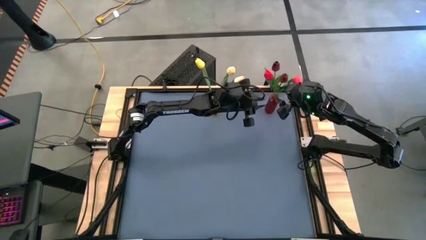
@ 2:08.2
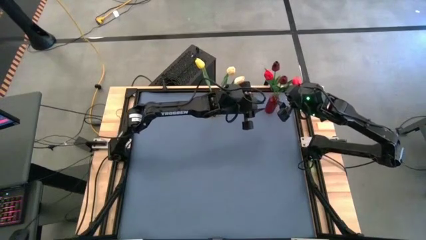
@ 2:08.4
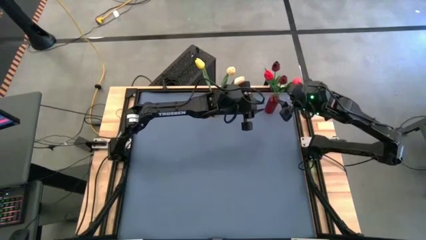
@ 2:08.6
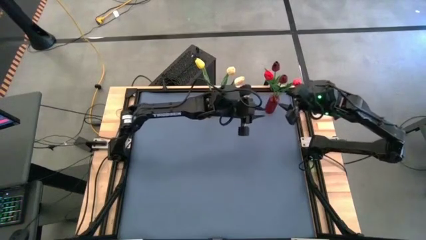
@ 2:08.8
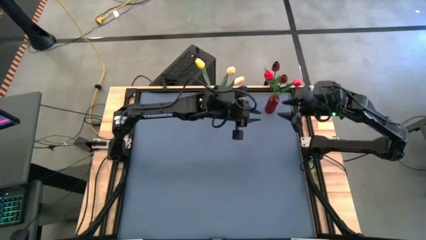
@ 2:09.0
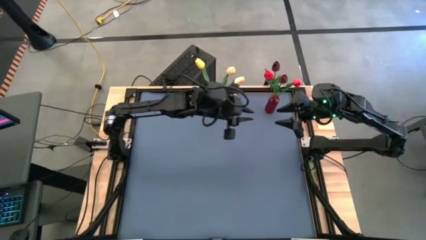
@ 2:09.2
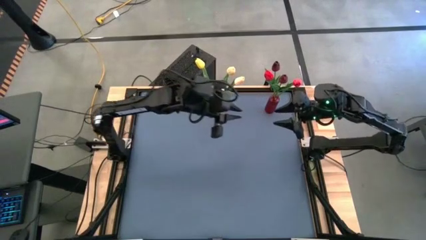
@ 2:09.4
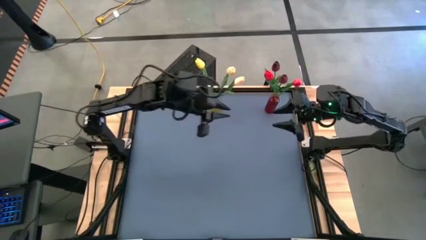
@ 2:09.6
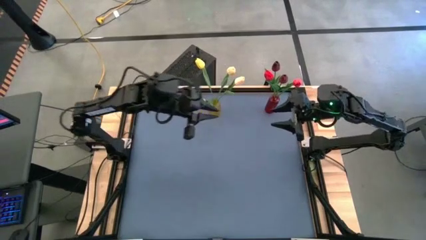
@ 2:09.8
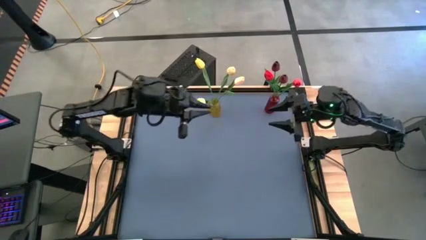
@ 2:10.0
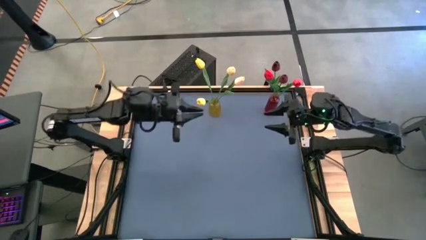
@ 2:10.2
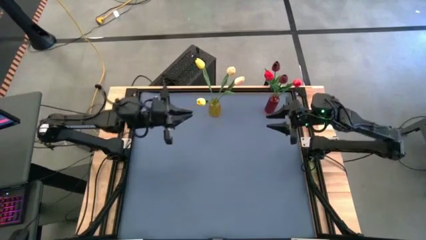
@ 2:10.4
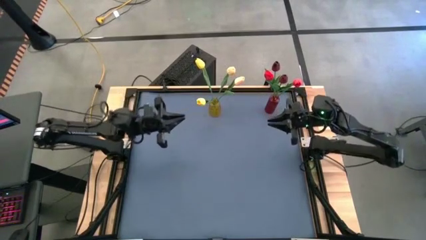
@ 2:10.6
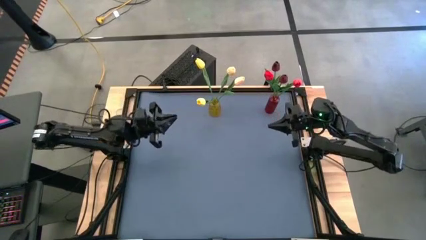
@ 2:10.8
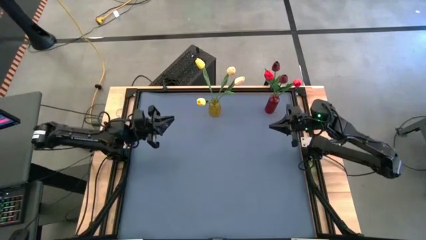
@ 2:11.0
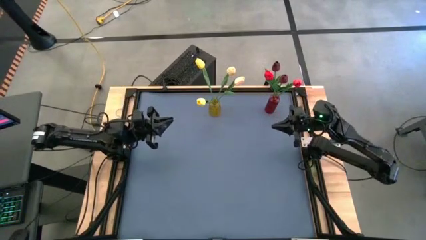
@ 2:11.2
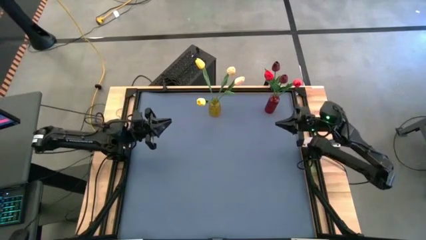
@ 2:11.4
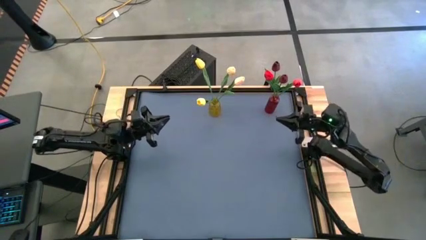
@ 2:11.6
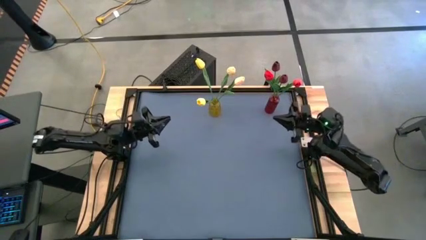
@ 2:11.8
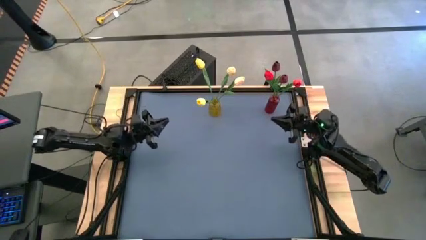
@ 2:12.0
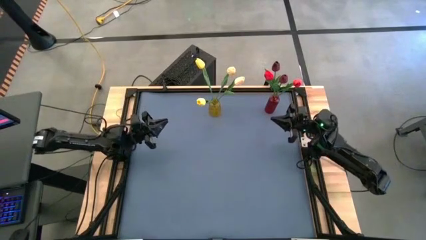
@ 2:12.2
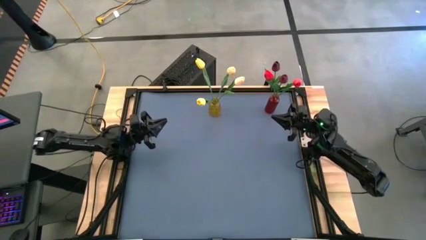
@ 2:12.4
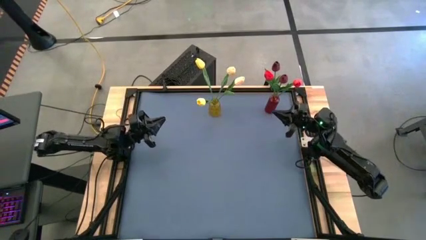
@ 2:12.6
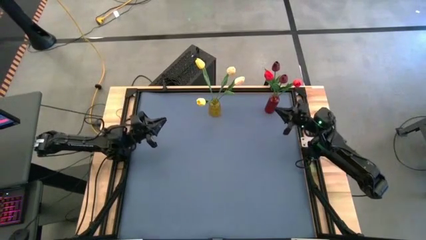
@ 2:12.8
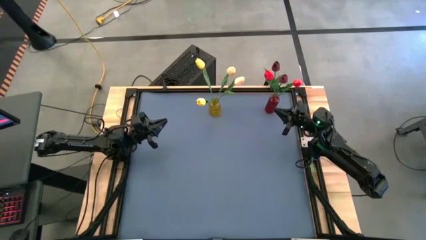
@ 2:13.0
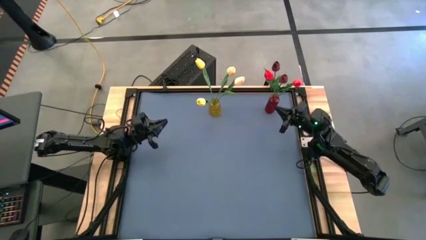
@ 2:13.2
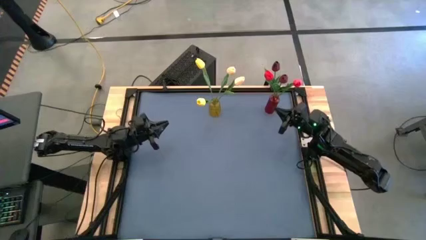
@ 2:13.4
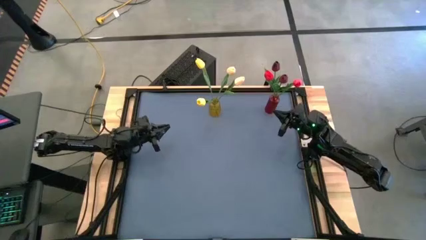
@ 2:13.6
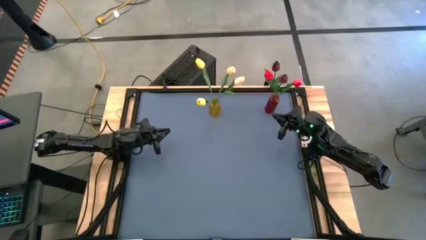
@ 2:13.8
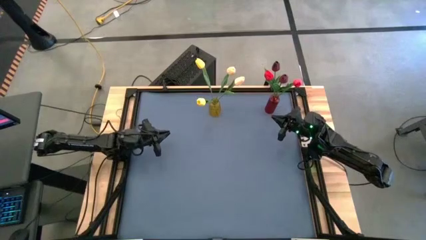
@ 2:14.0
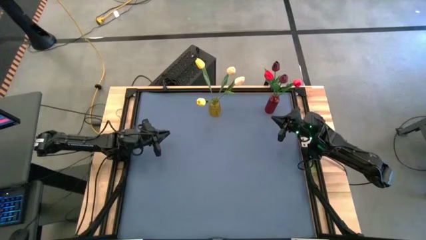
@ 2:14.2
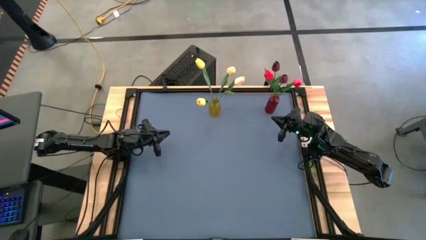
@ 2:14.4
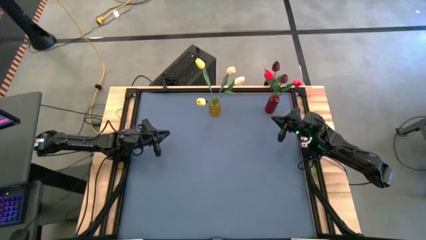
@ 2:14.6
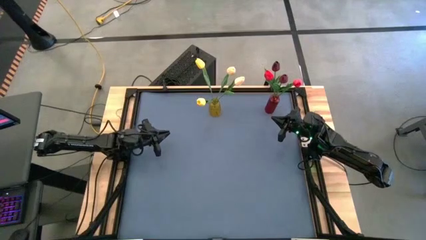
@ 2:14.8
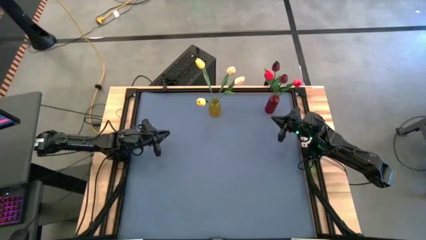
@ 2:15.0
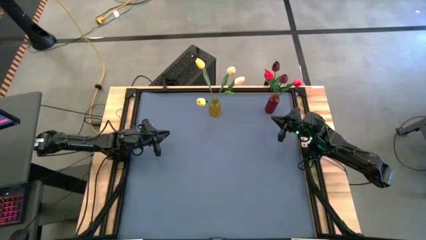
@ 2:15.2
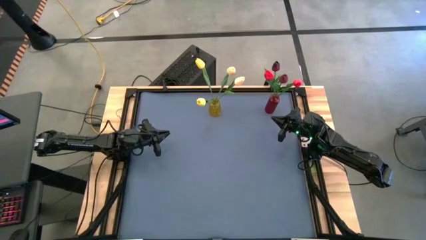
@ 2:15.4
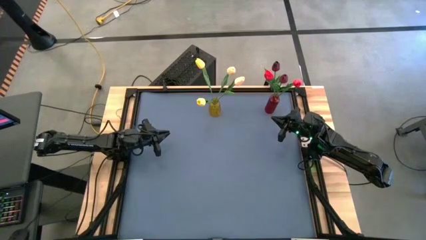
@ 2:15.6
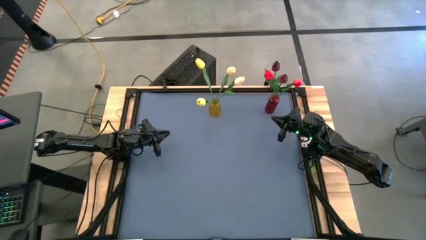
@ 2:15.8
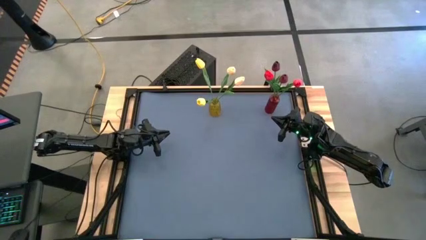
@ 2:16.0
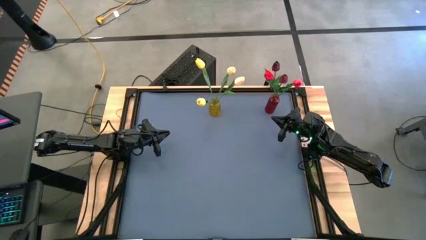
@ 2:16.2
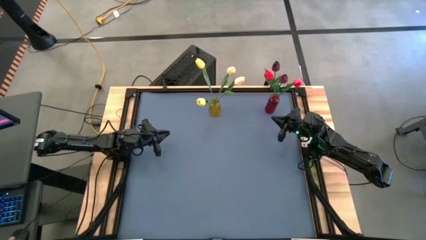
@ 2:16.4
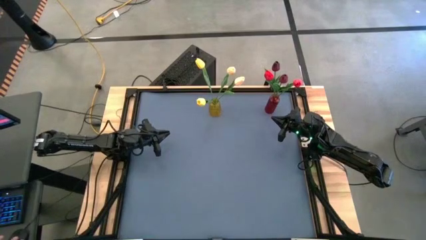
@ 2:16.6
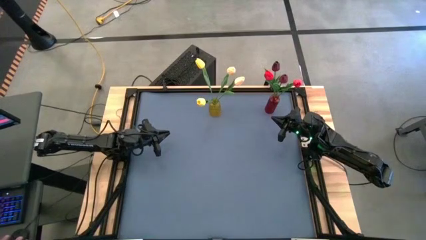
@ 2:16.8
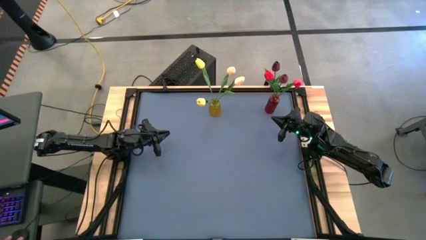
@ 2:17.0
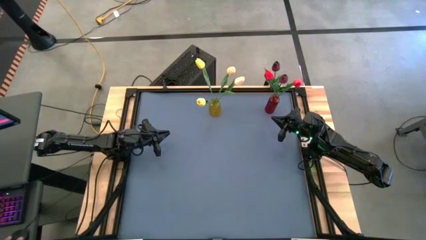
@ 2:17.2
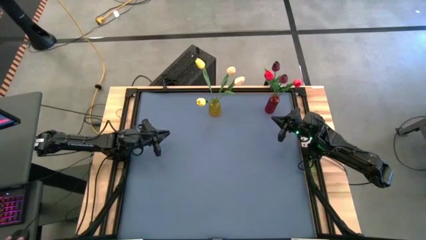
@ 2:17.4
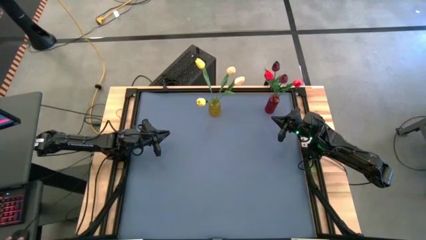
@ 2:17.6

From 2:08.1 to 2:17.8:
Task: Sort flowers into vase by color
Return to Home Position

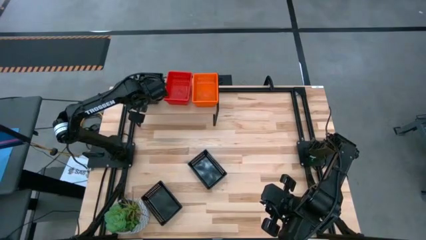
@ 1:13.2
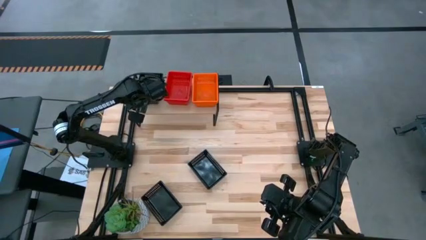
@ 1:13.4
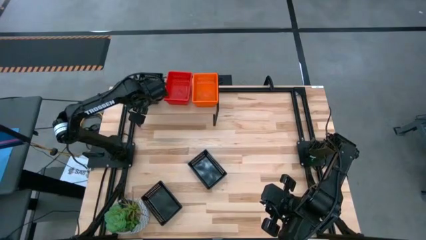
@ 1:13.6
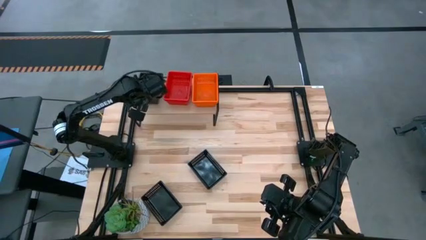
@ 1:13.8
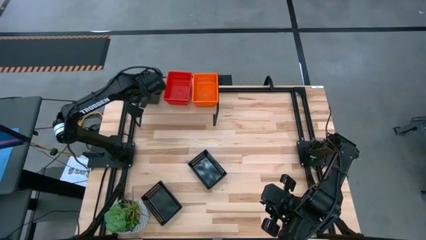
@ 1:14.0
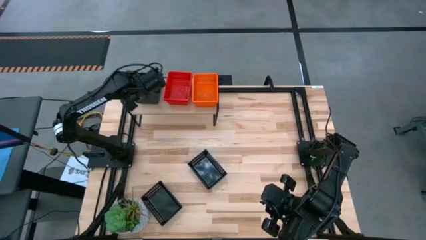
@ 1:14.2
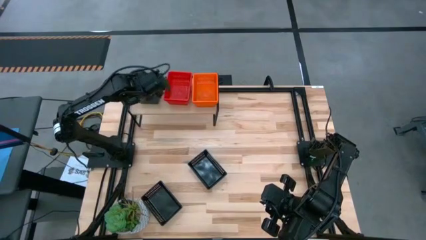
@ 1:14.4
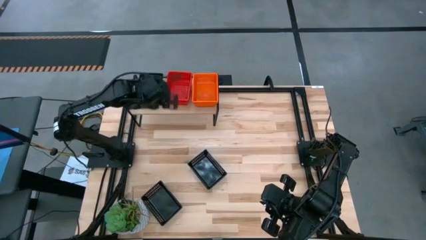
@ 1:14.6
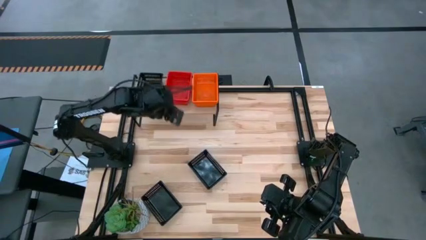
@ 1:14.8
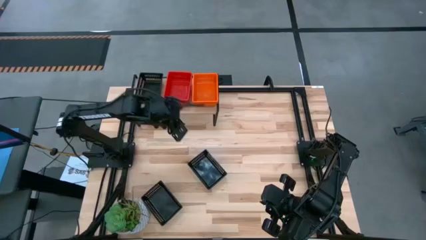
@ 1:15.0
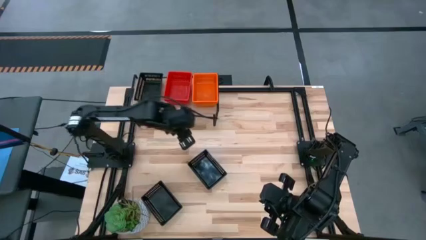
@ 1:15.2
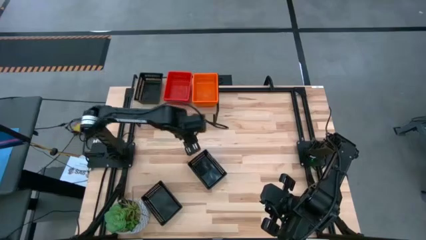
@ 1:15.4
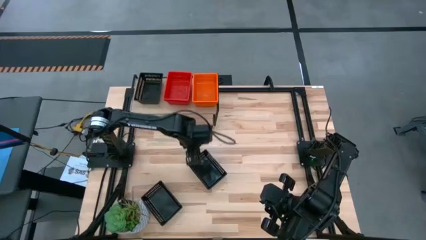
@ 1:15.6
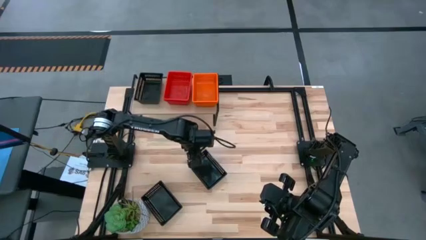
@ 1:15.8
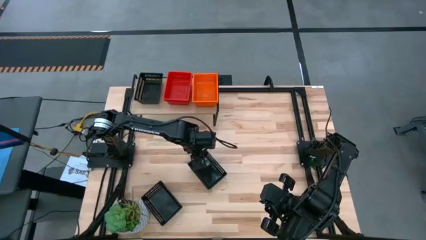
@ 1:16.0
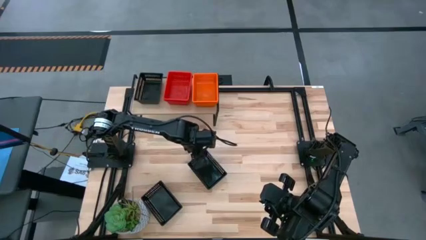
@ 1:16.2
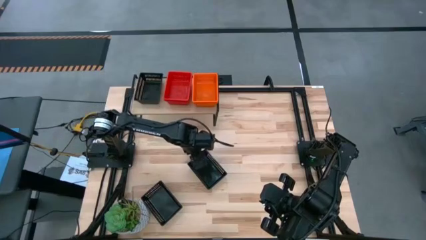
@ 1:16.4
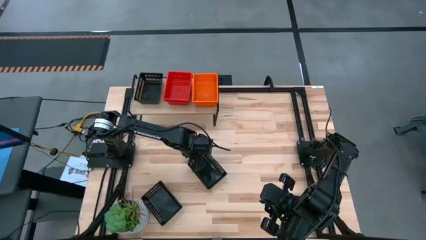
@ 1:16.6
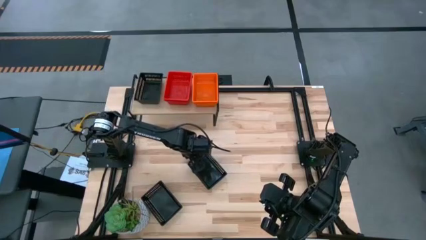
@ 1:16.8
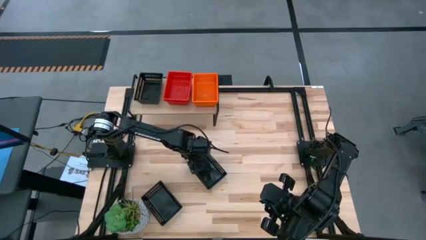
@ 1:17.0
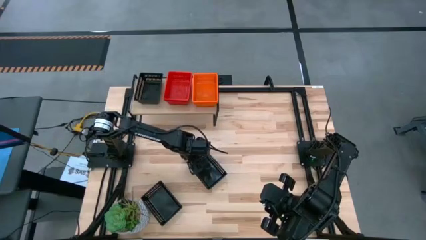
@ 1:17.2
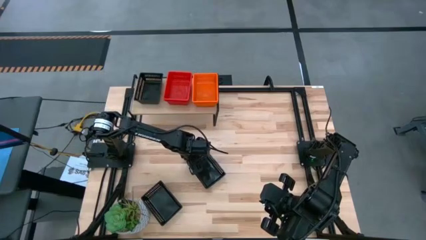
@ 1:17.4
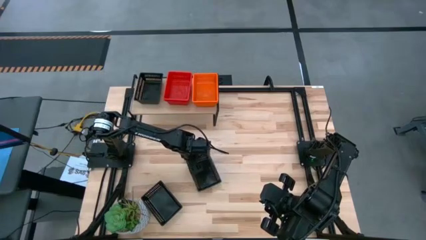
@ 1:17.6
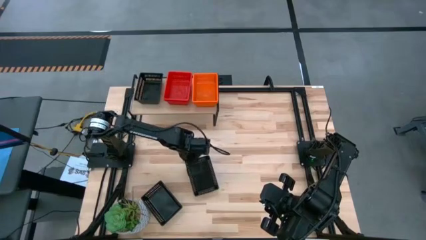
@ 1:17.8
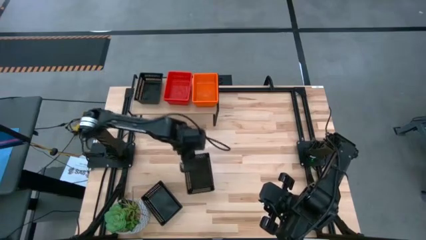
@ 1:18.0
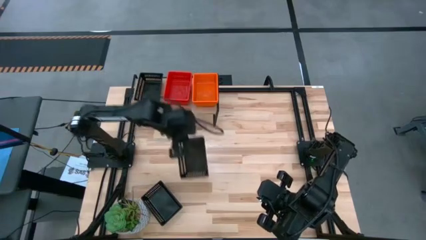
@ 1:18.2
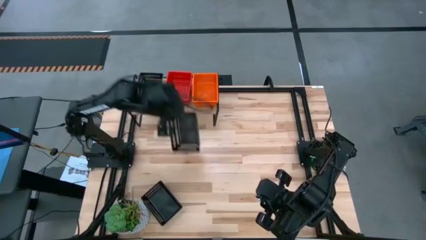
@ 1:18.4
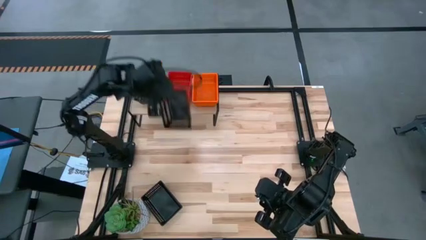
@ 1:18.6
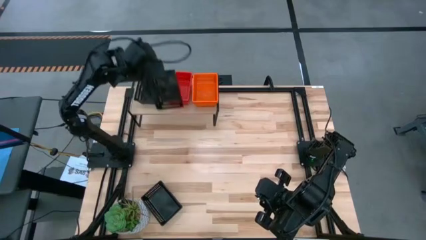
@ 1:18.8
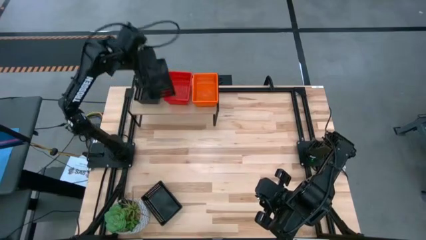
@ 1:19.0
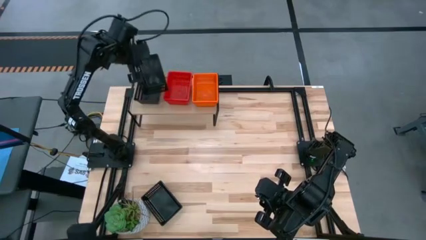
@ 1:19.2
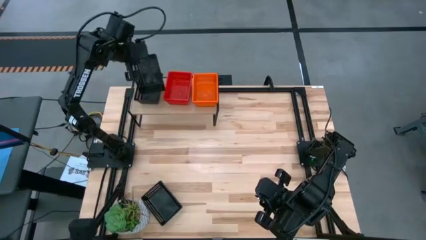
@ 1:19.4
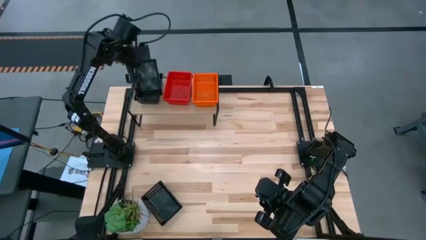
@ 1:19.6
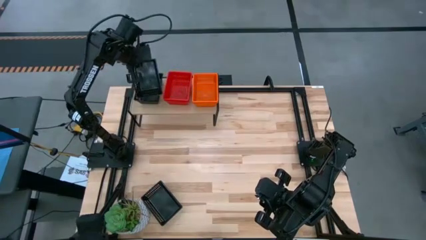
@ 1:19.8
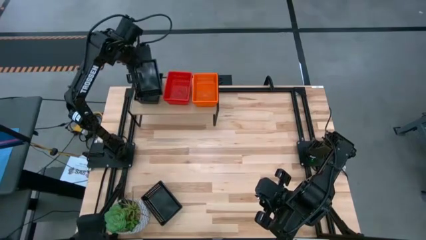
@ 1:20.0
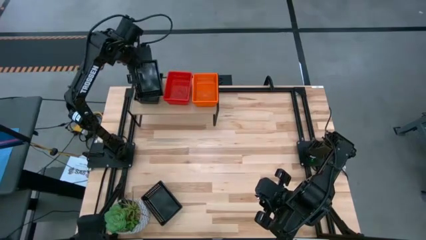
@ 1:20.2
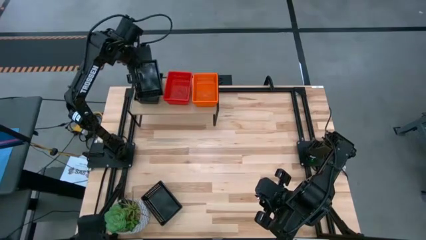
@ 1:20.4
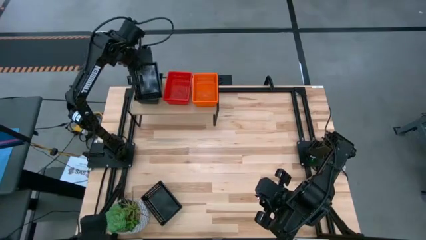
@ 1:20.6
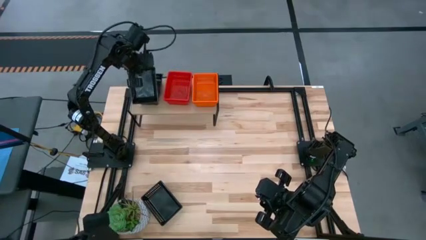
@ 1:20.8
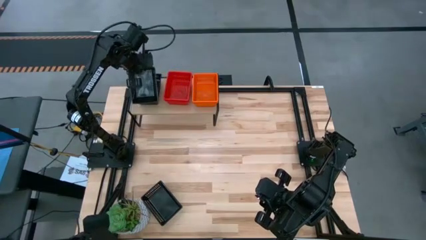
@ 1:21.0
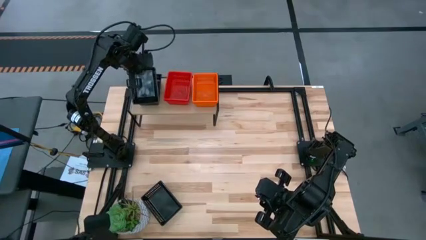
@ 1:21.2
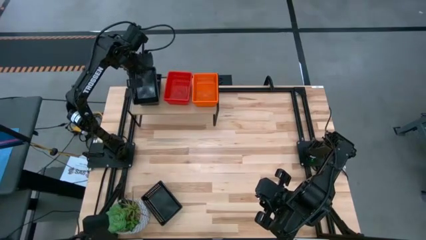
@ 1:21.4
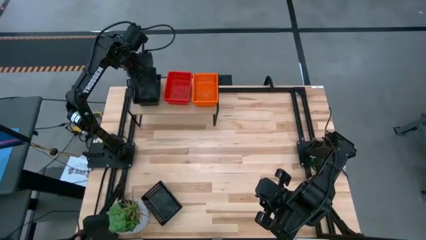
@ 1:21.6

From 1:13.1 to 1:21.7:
Task: Stack baskets on shelf by color
Stack the right black bin on top of the other black bin on the shelf
